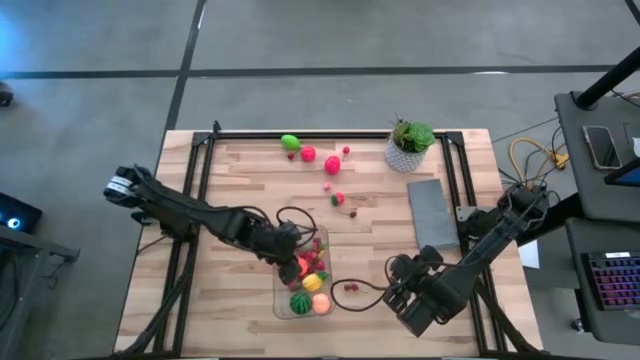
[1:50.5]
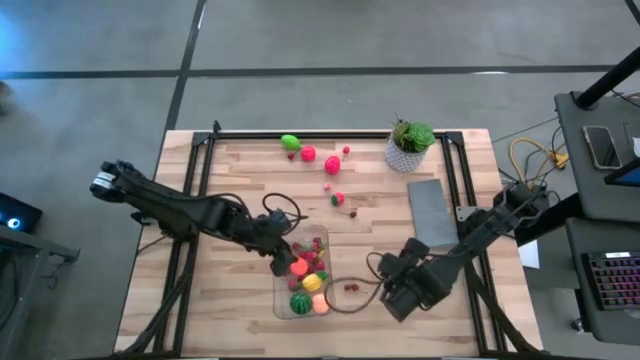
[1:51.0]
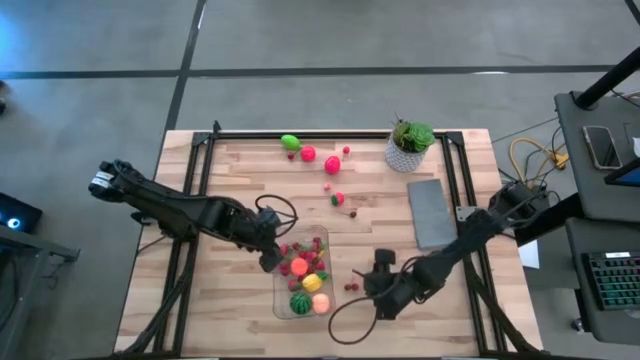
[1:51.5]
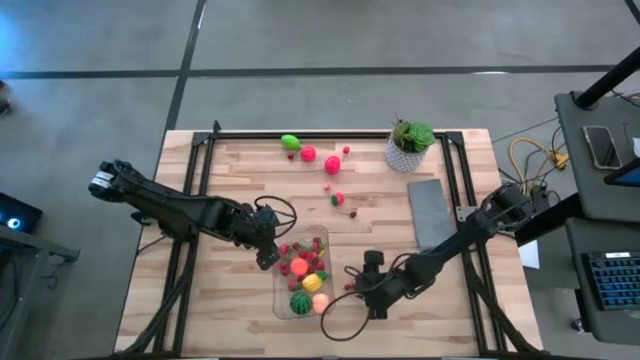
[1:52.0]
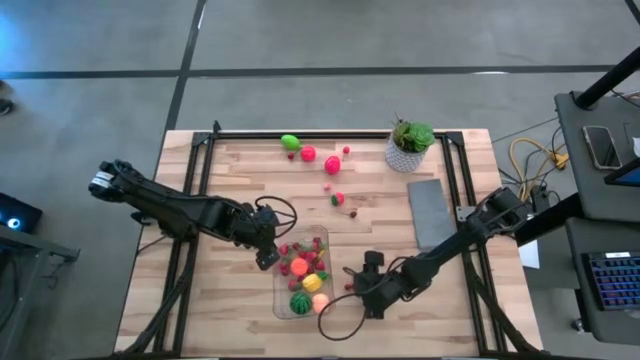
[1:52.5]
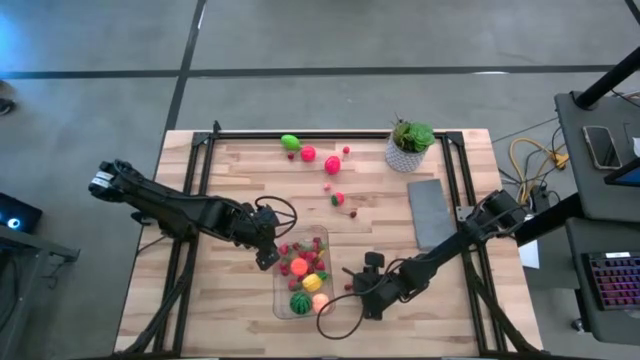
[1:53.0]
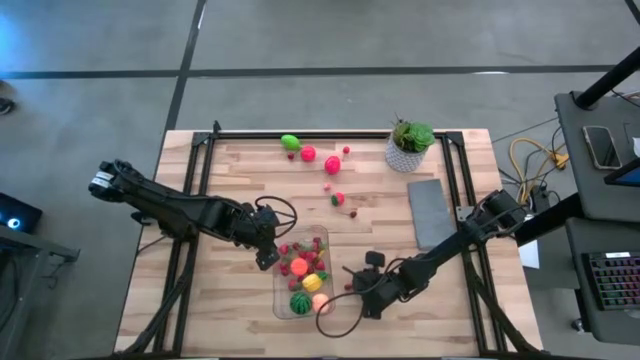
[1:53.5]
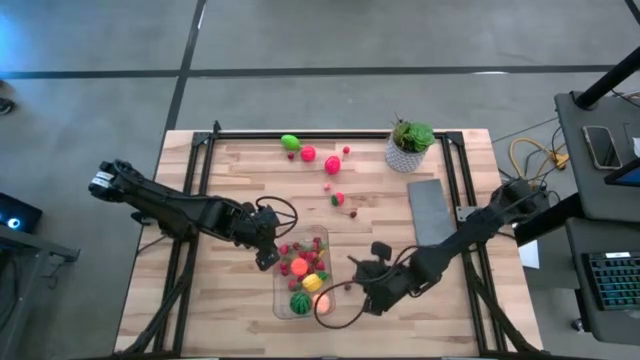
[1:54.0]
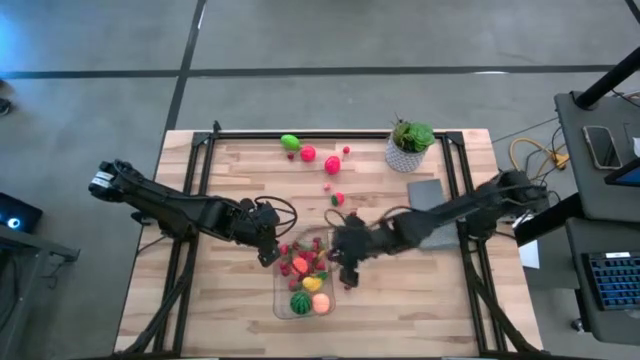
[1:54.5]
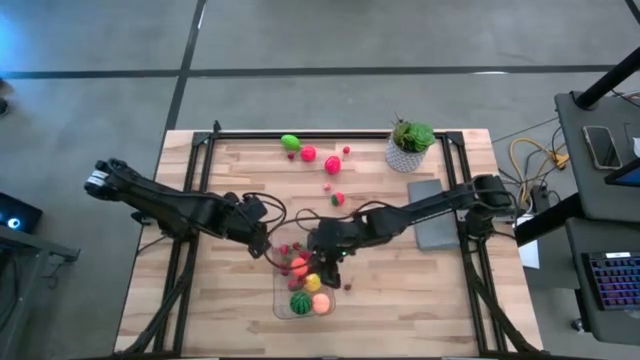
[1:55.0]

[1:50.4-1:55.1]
Task: Pick and placing Produce into tupperware
Put the red cherry into the transparent bin

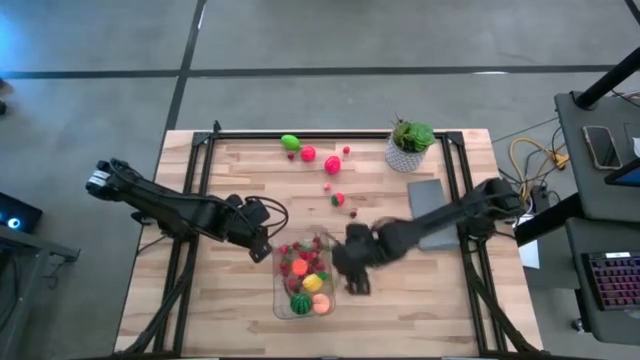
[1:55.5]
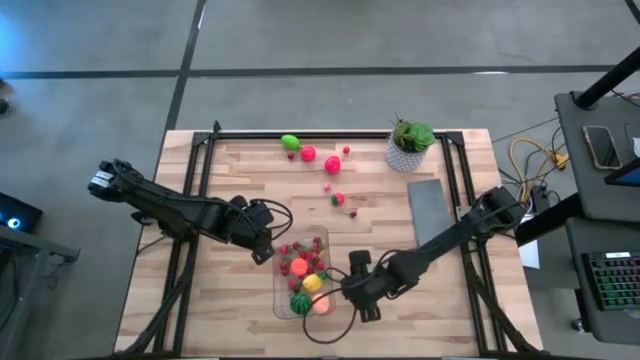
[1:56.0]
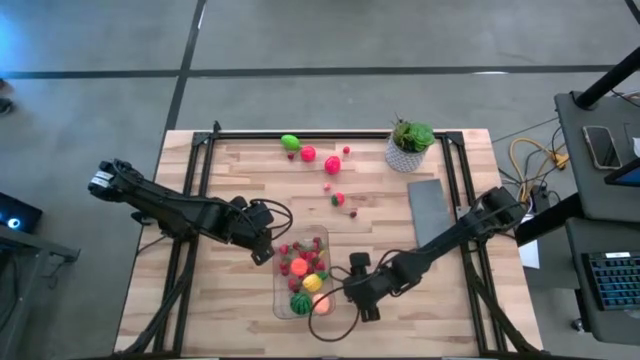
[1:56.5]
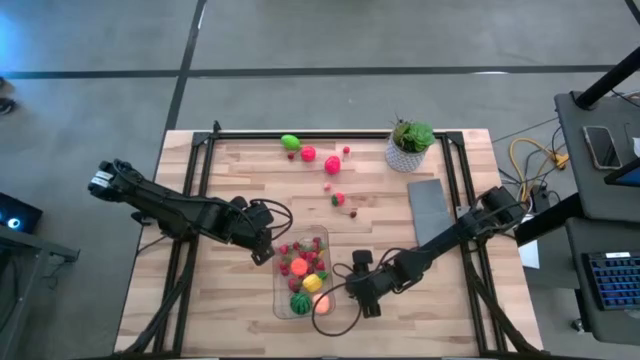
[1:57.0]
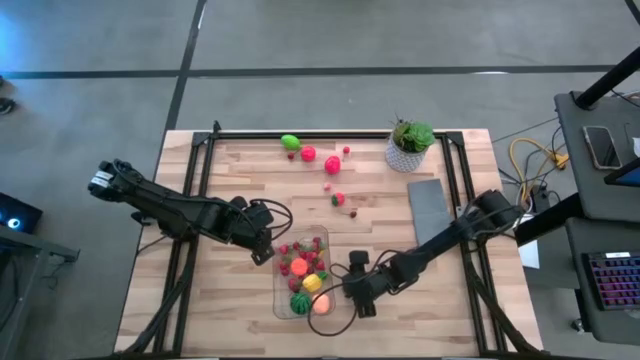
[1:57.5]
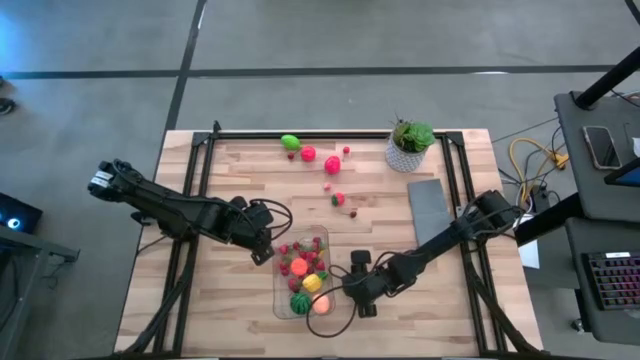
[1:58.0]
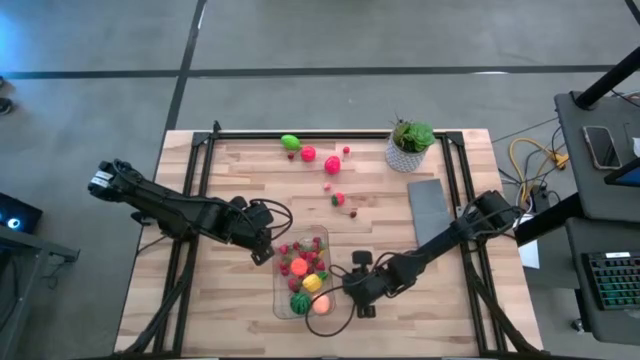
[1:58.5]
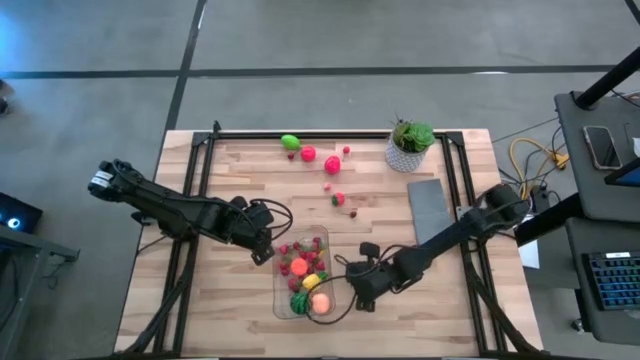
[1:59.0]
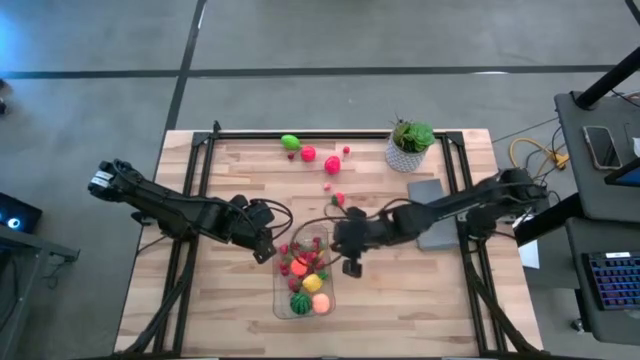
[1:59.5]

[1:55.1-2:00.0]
Put the red cherry into the transparent bin

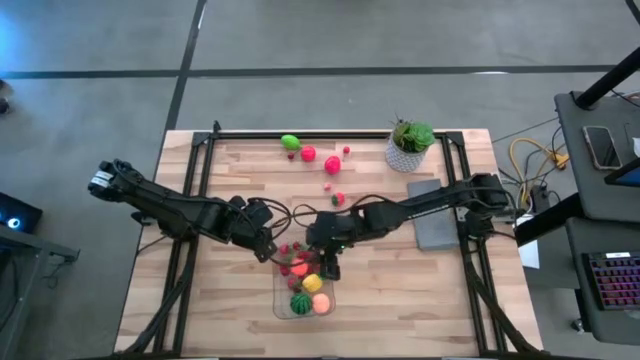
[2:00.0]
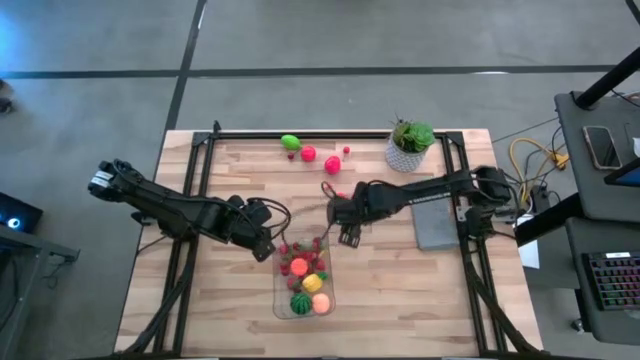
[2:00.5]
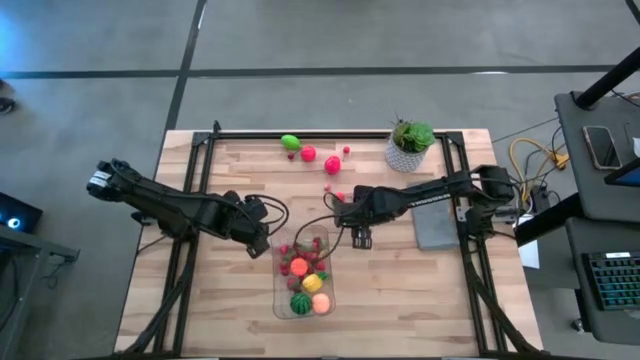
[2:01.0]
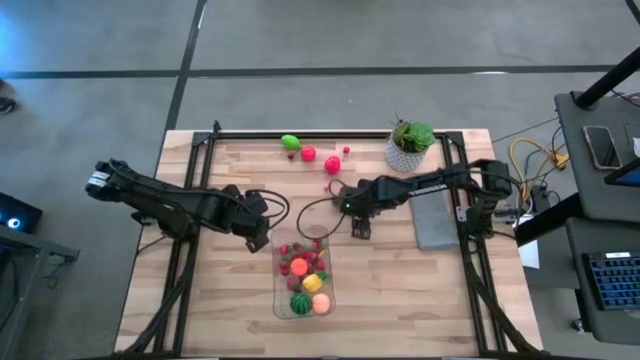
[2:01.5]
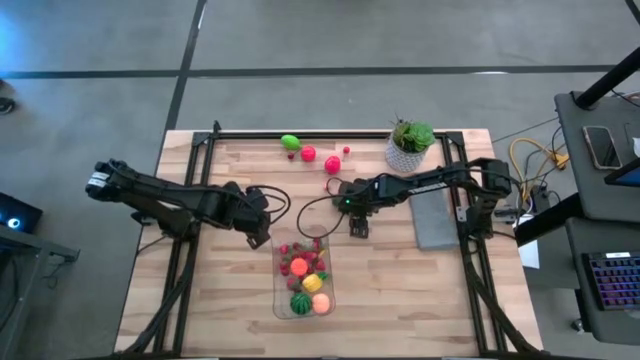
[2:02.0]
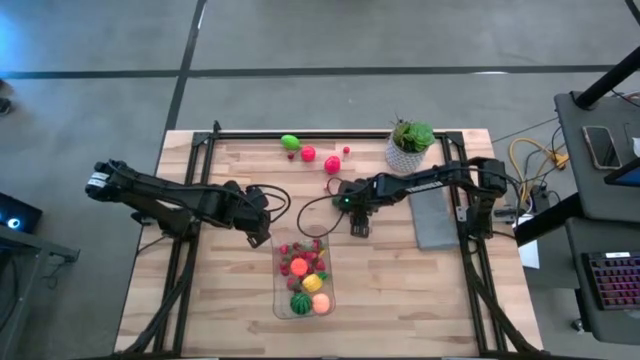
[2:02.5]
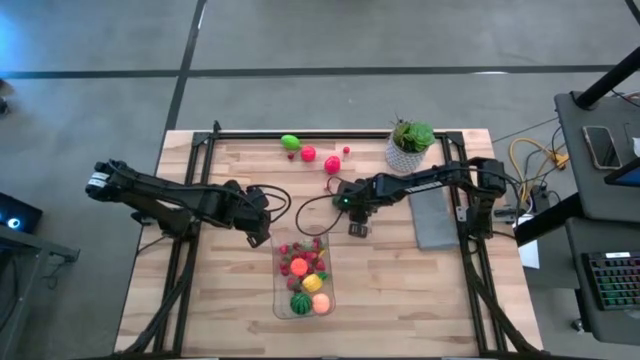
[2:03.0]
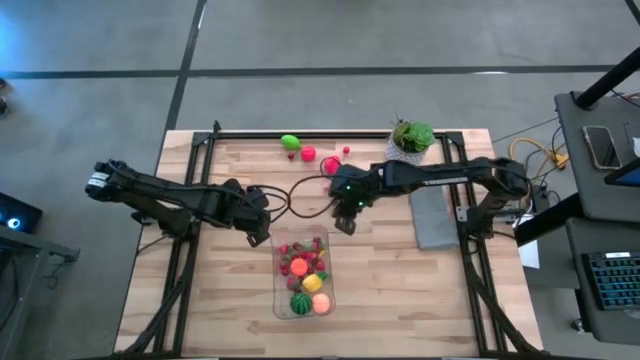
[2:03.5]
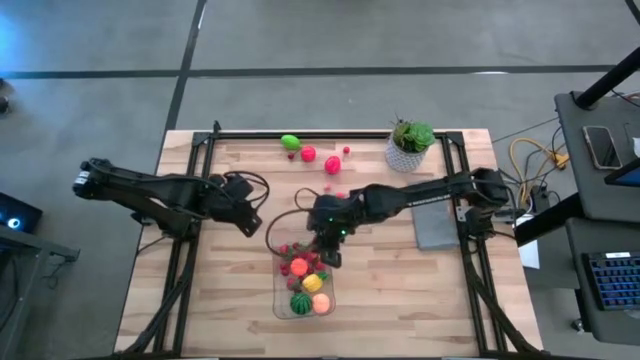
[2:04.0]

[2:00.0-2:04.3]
Put the red cherry into the transparent bin

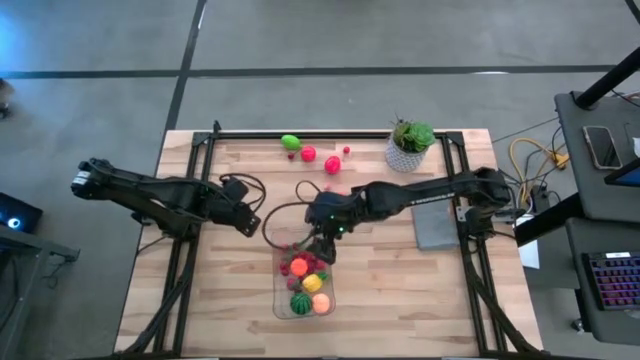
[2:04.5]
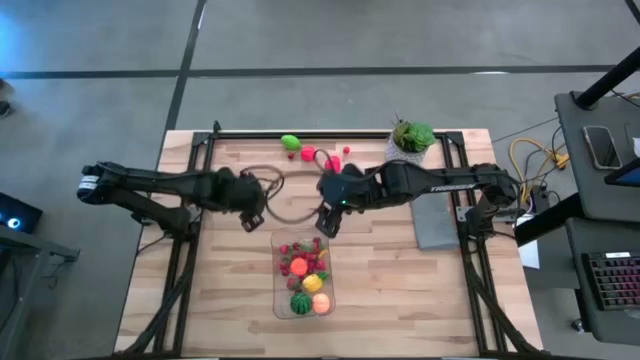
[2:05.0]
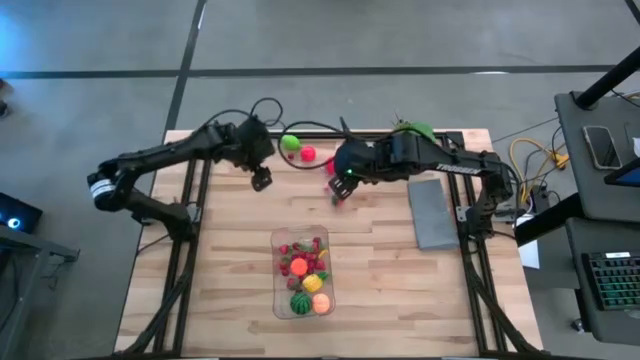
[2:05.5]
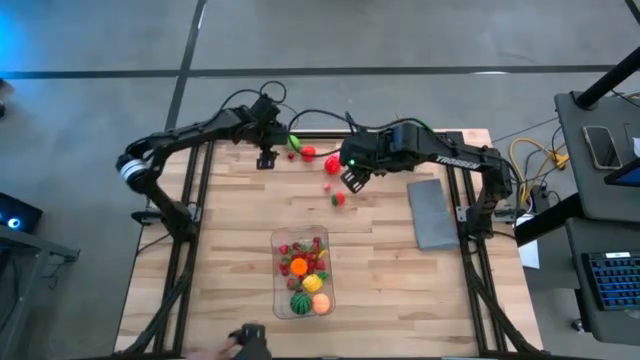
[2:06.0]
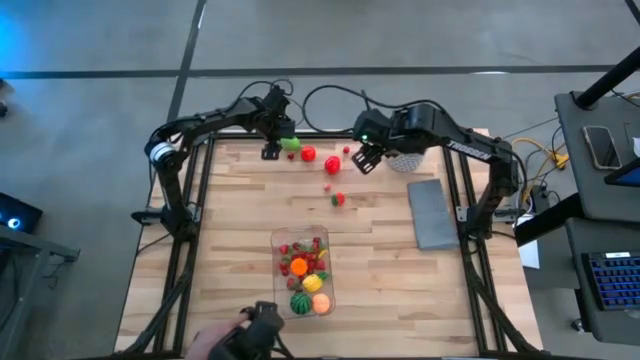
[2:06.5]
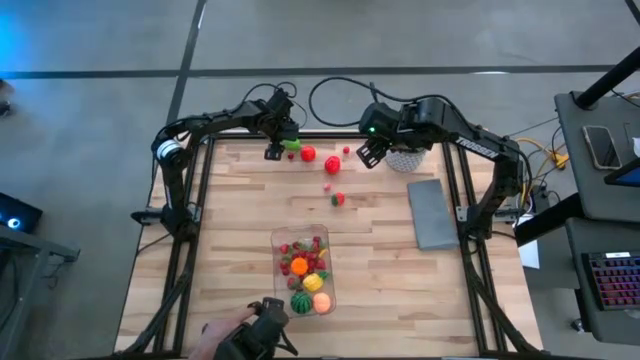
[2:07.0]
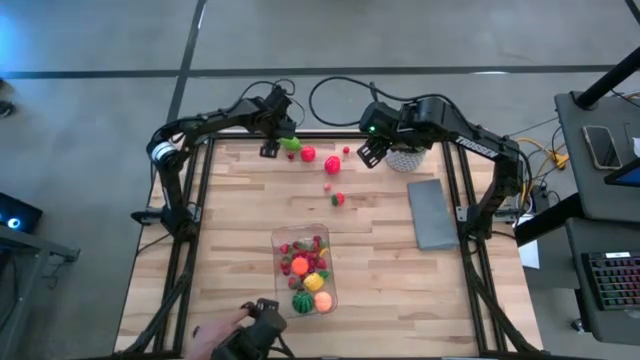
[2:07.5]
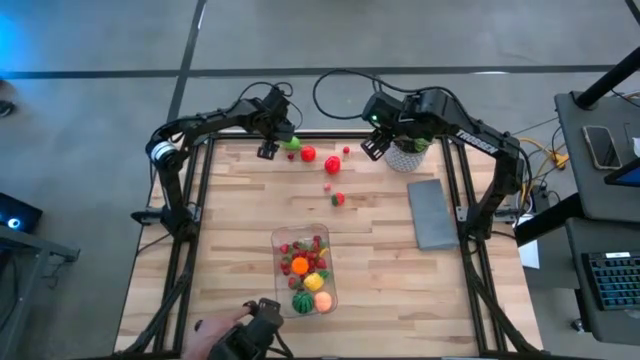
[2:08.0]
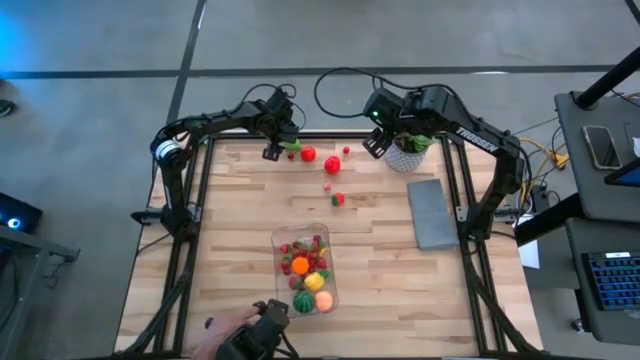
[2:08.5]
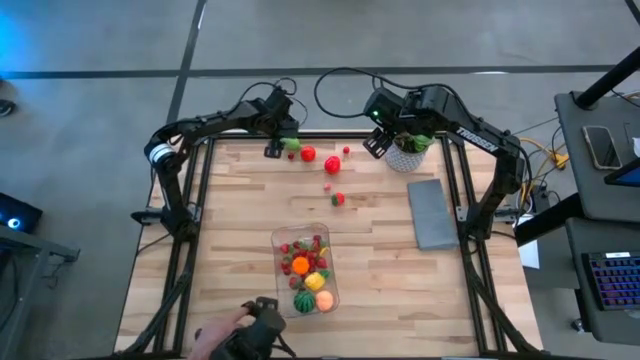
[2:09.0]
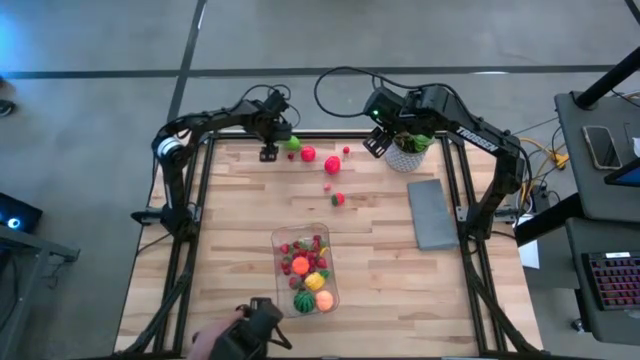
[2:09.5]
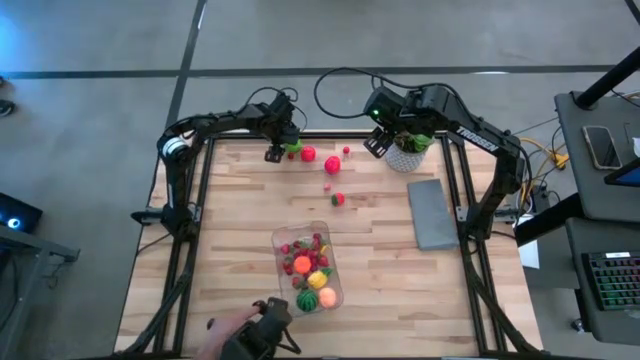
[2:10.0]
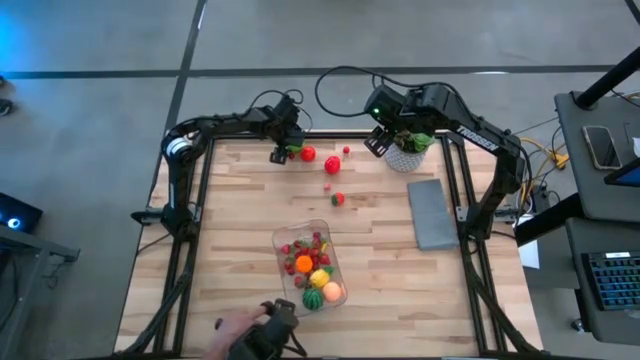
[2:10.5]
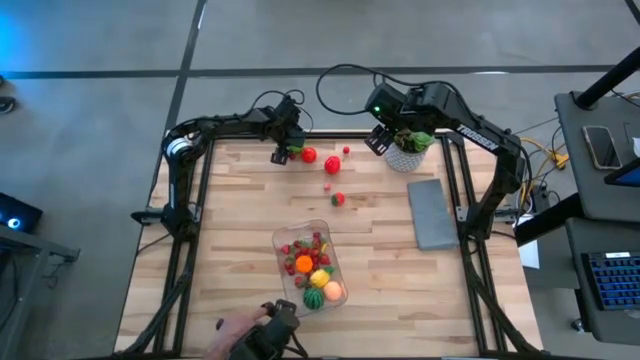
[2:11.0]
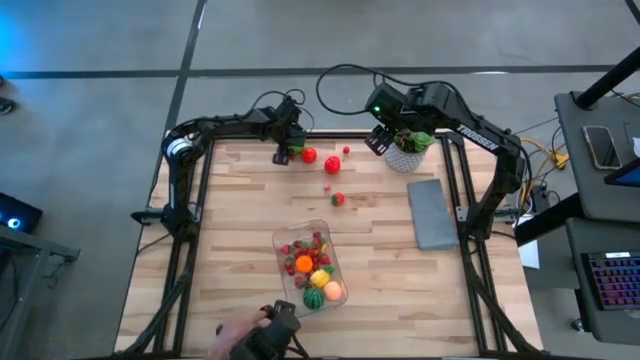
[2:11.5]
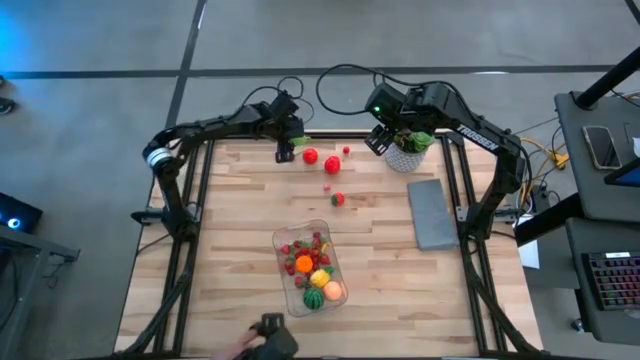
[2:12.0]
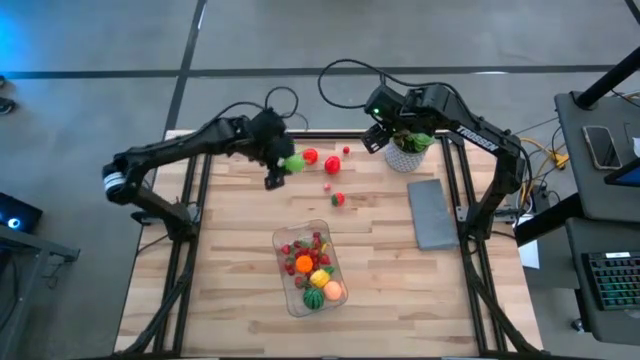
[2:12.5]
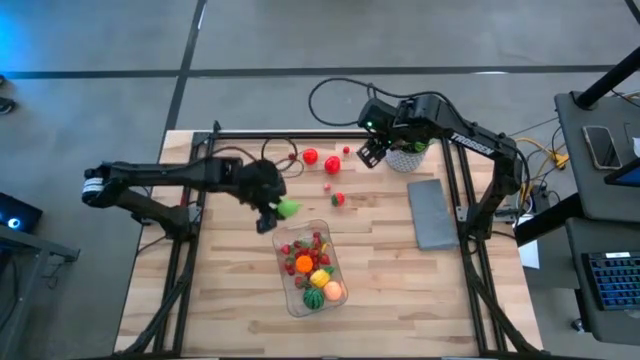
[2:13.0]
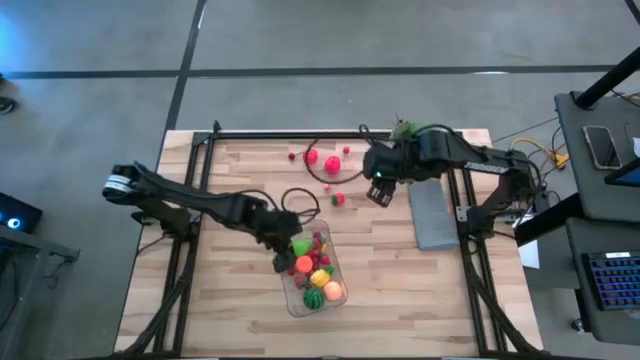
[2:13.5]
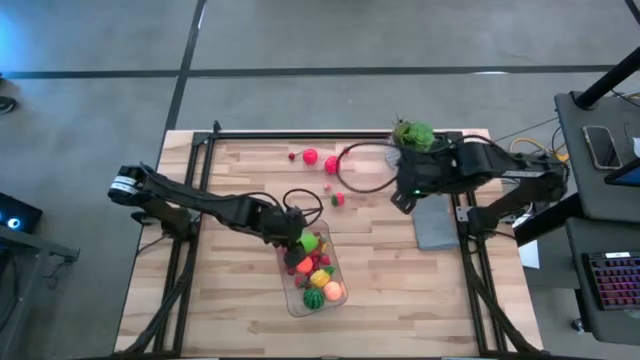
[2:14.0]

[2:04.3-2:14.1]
Put the green melon into the transparent bin
